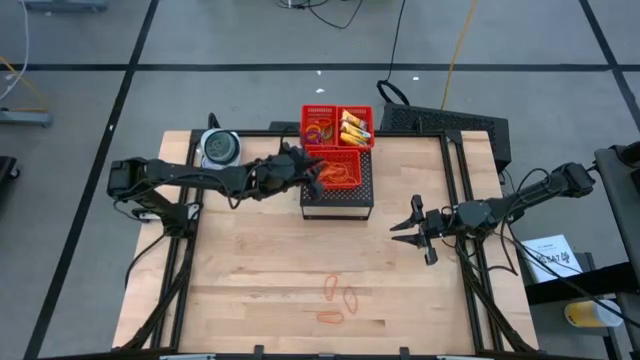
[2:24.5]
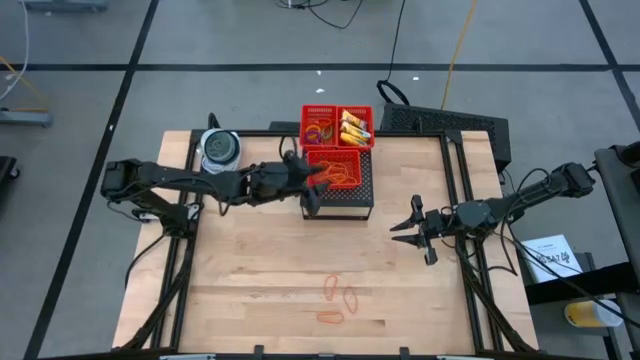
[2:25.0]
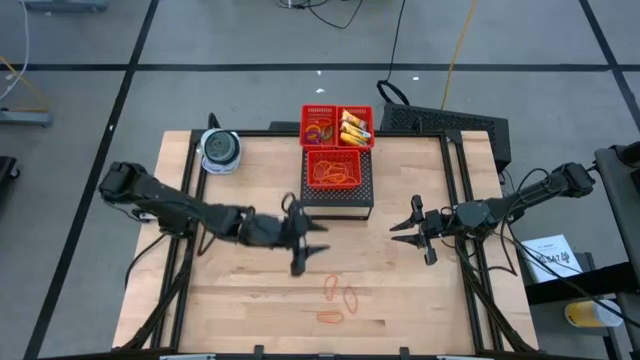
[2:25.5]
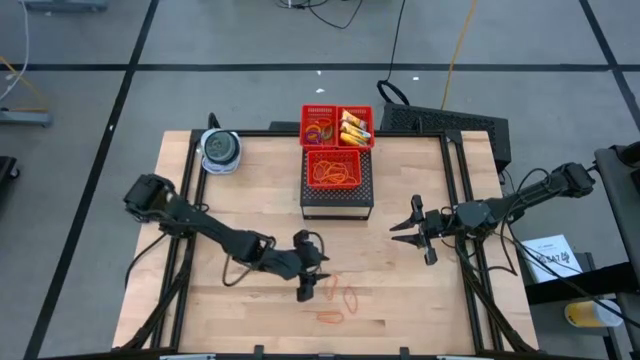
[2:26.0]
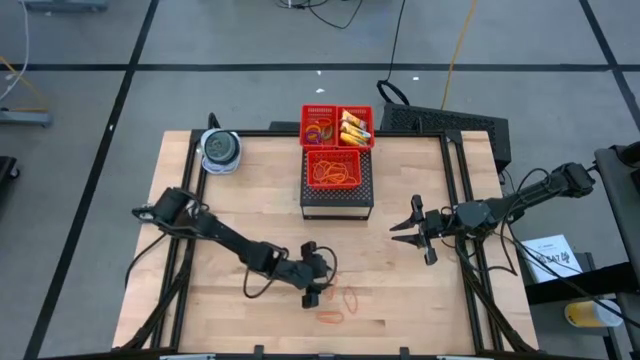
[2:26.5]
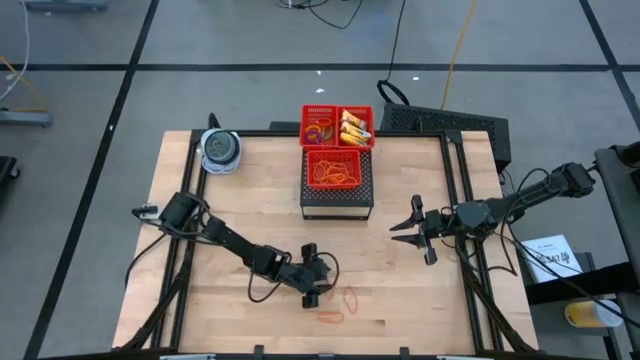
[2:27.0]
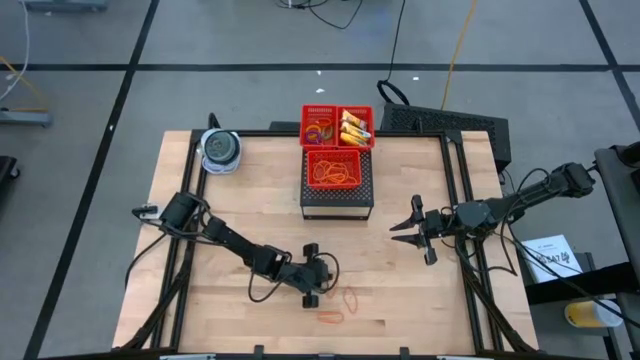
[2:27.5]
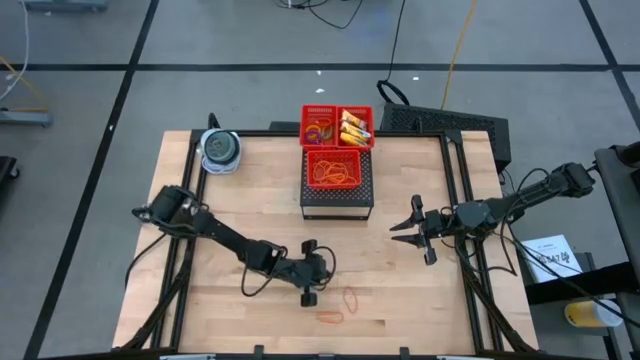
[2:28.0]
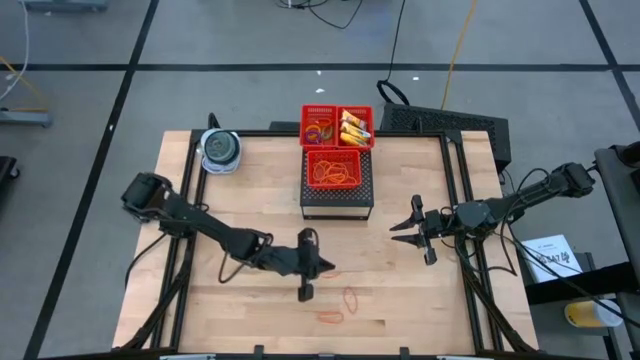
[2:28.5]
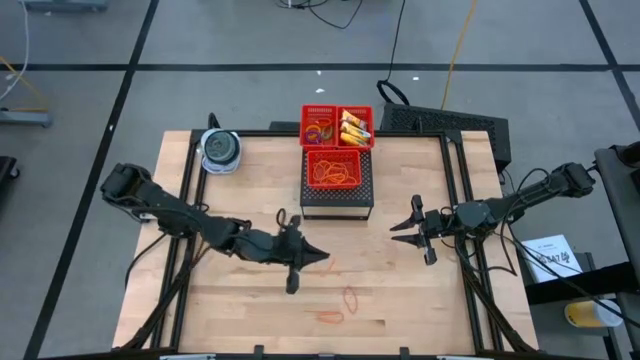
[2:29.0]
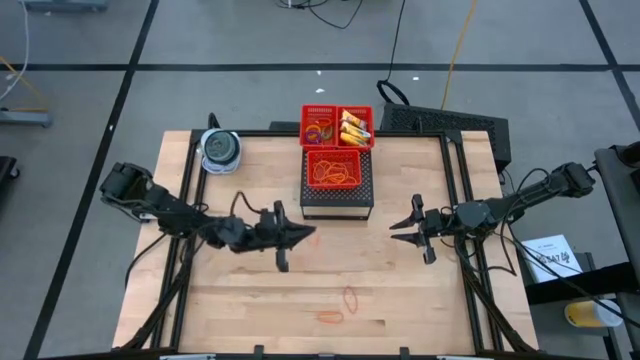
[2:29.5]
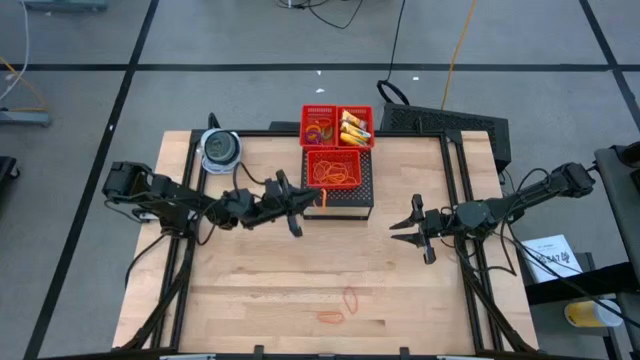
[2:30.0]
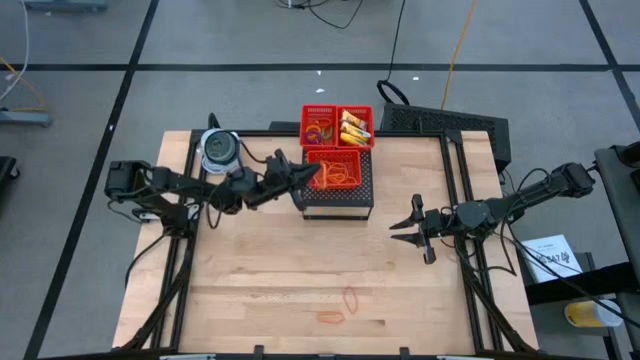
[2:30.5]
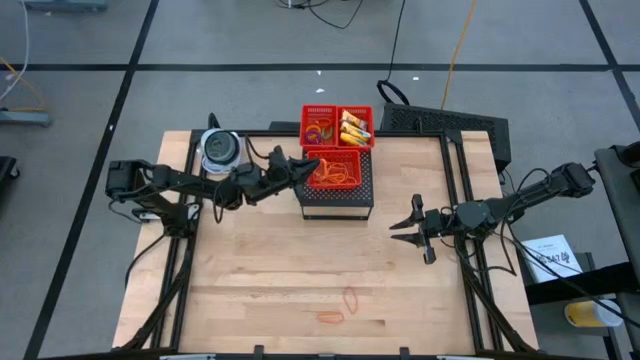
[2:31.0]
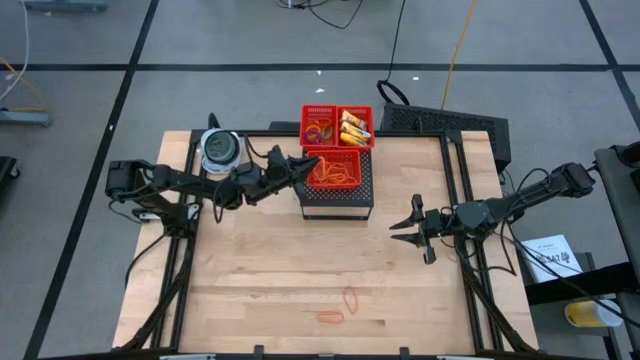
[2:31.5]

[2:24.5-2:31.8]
Task: Pick & Place Office Desk Supplies
Put the orange rubber band in the bottom red bin on the shelf

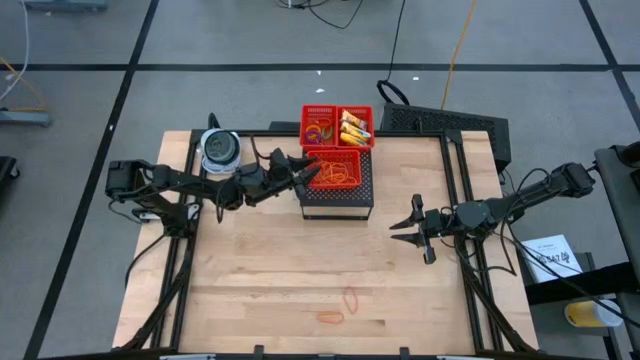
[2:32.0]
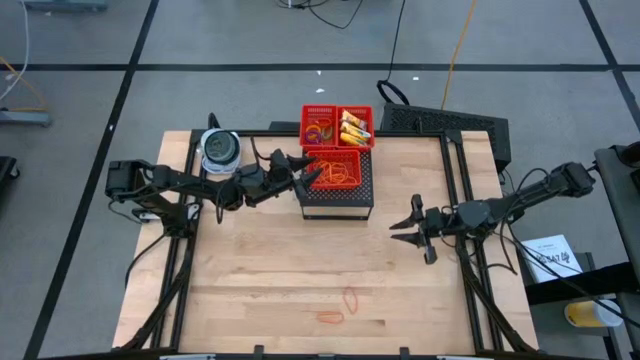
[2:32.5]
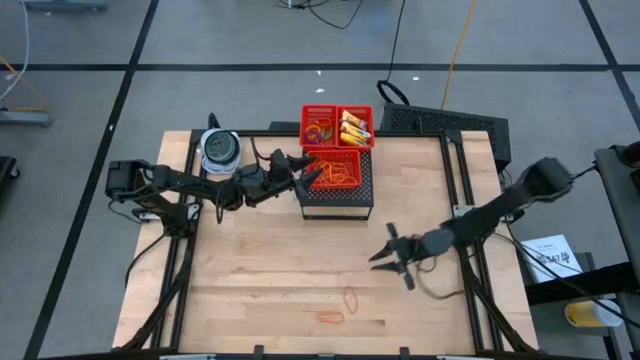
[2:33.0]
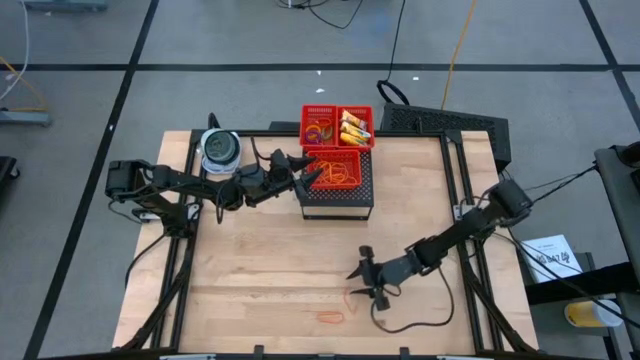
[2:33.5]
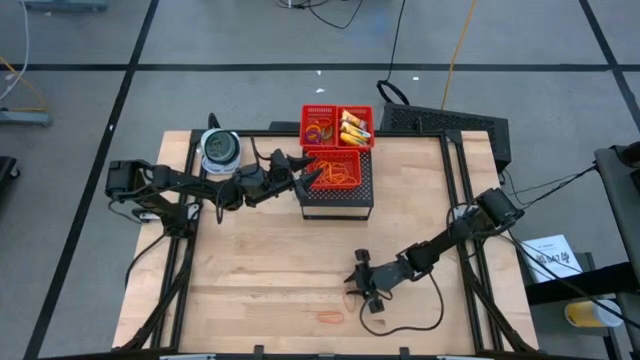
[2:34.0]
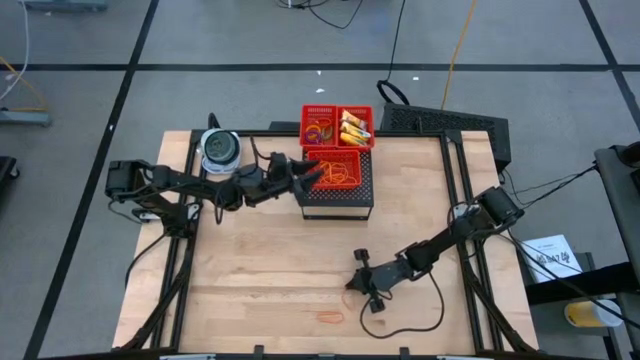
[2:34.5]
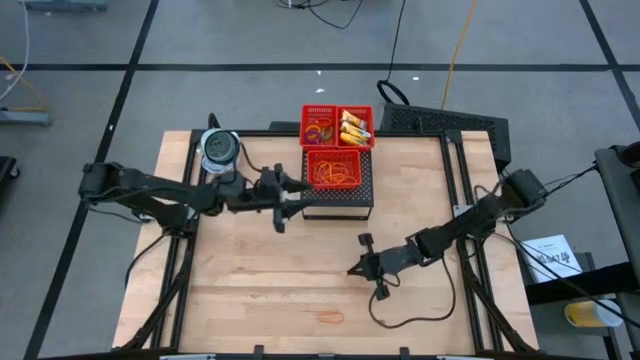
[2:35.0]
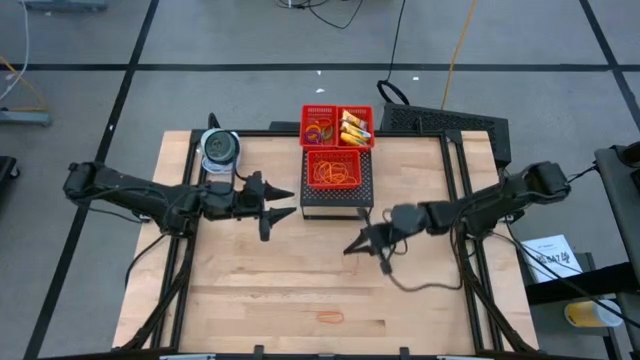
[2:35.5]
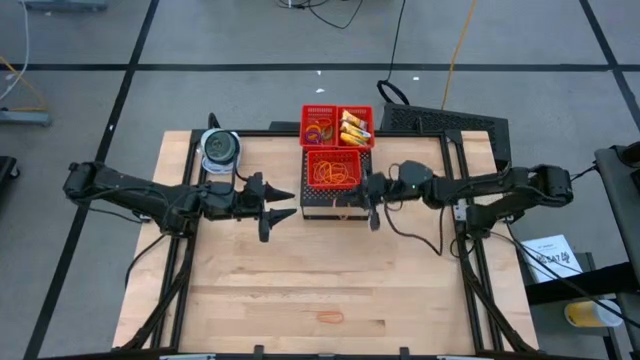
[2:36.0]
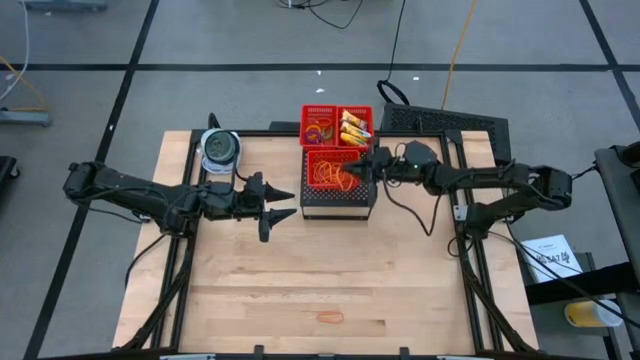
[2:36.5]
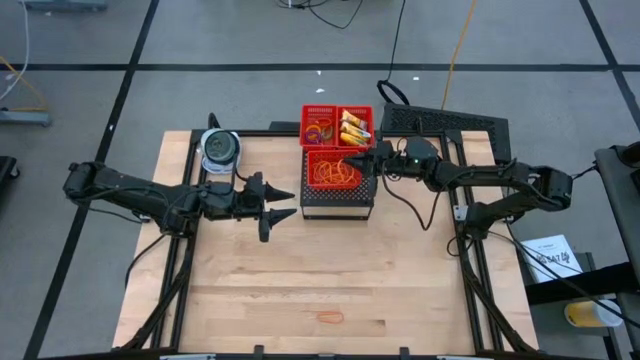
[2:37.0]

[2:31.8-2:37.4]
Put the orange rubber band in the bottom red bin on the shelf

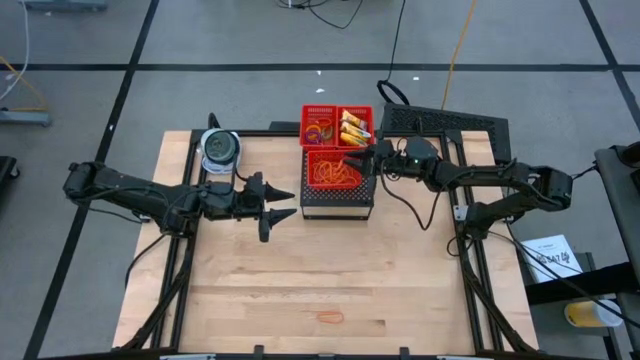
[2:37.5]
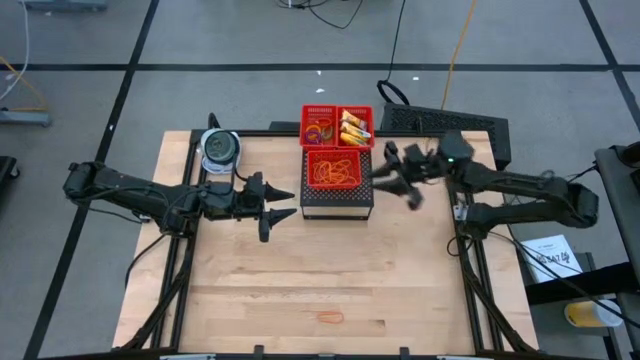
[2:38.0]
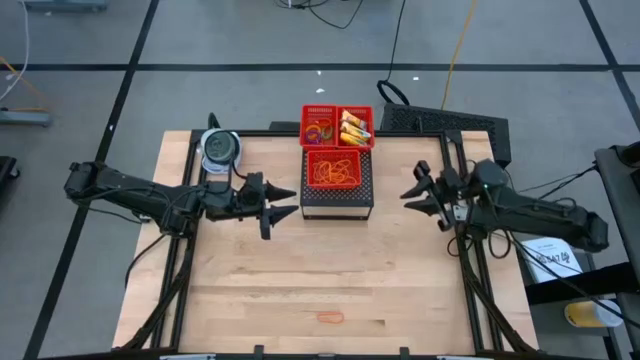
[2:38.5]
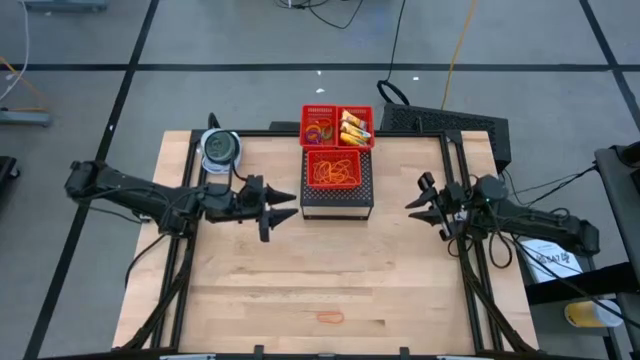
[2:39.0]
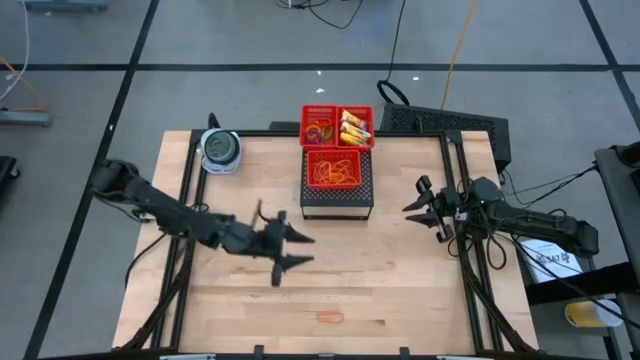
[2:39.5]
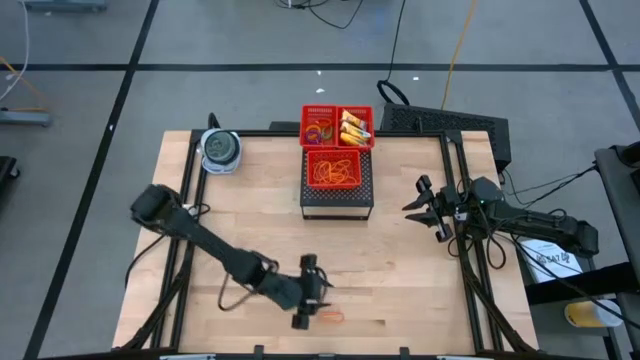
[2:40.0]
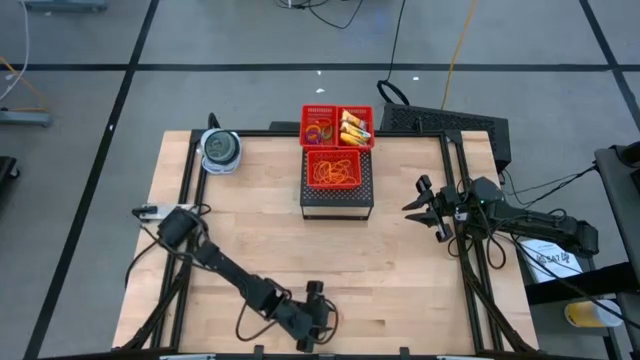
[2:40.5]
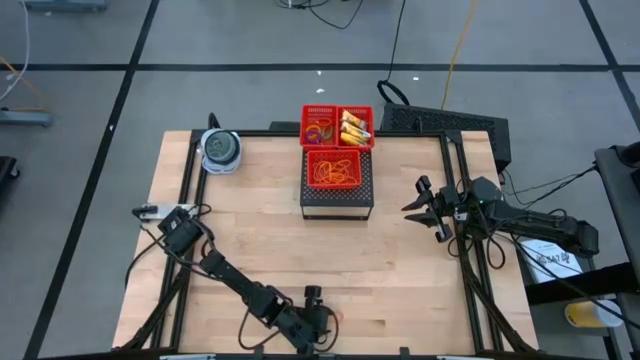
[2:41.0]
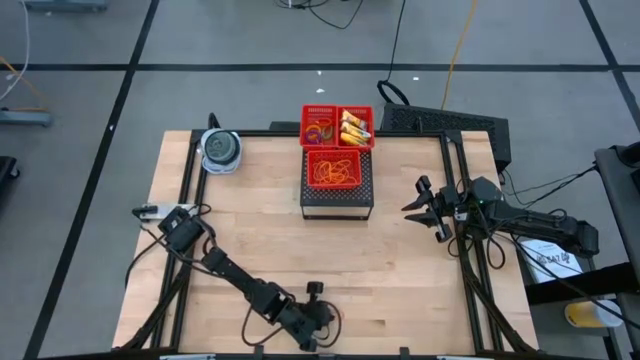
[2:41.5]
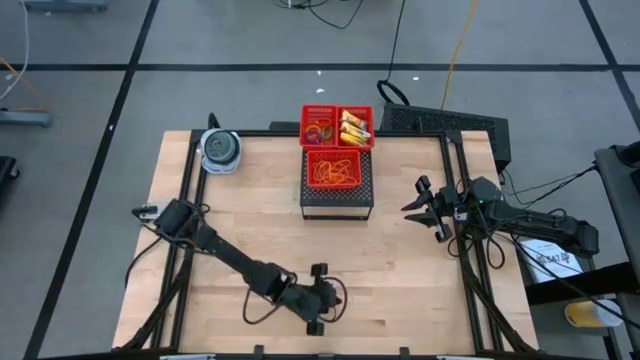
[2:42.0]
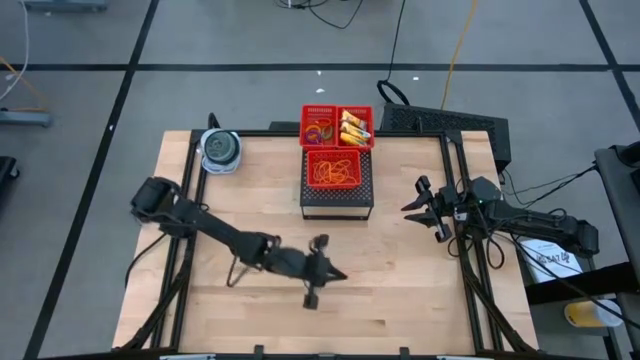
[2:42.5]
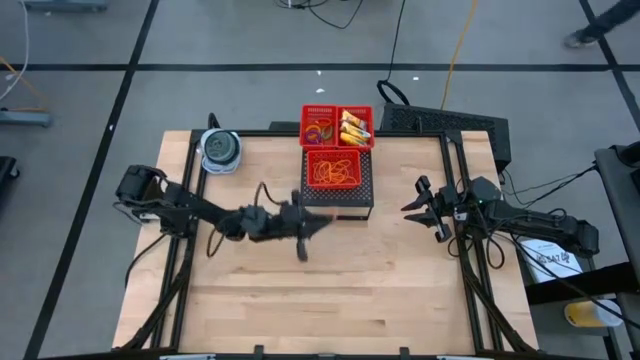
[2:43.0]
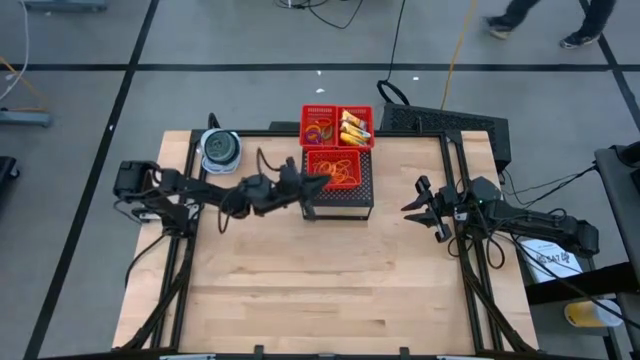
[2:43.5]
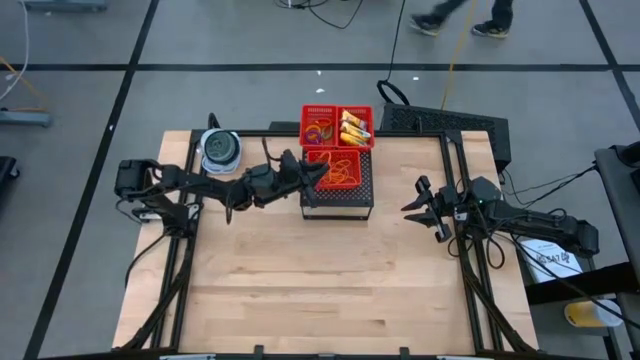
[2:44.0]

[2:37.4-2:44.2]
Put the orange rubber band in the bottom red bin on the shelf
